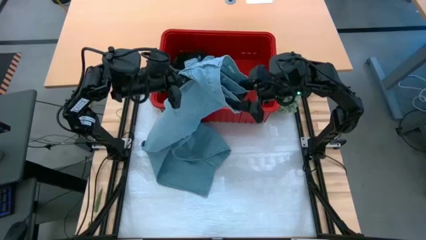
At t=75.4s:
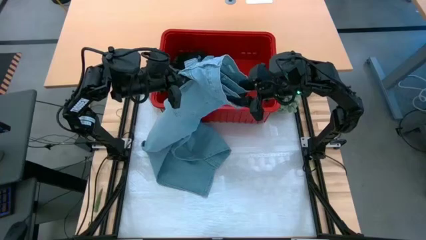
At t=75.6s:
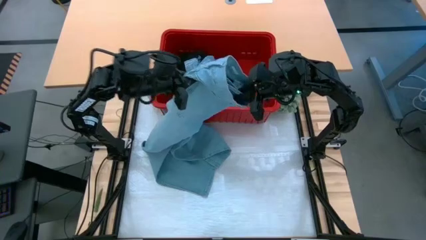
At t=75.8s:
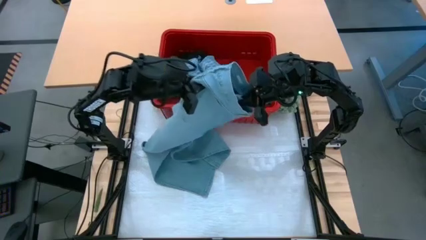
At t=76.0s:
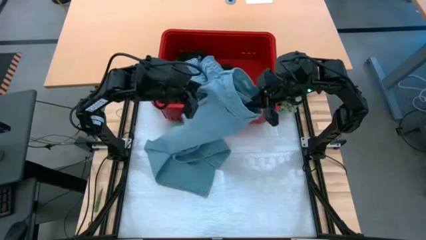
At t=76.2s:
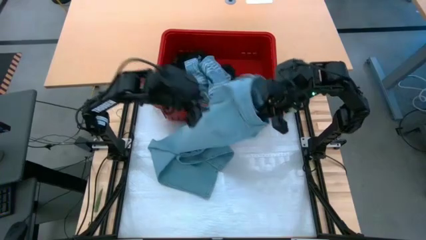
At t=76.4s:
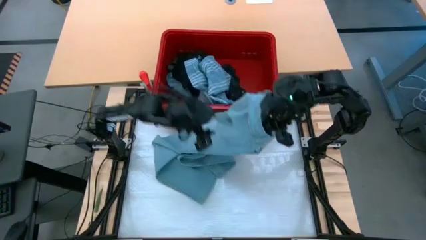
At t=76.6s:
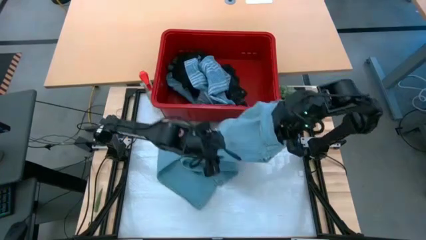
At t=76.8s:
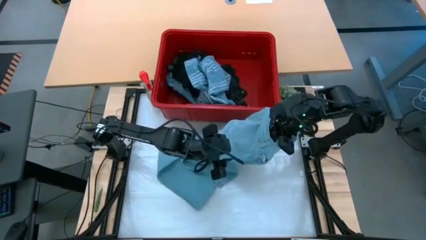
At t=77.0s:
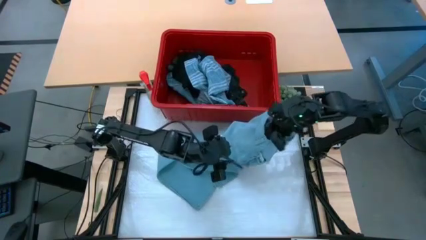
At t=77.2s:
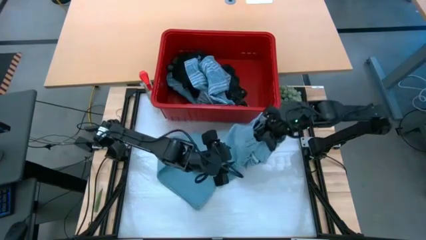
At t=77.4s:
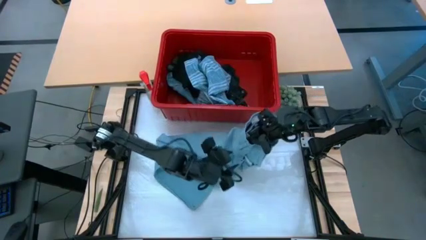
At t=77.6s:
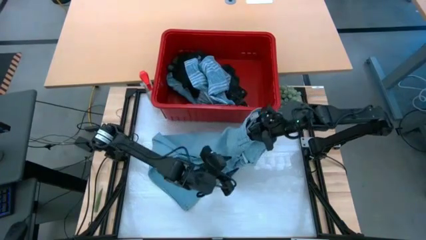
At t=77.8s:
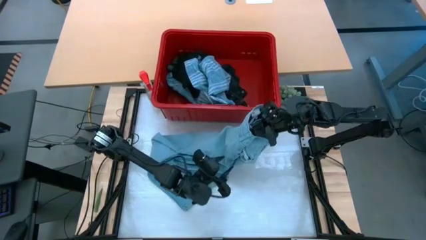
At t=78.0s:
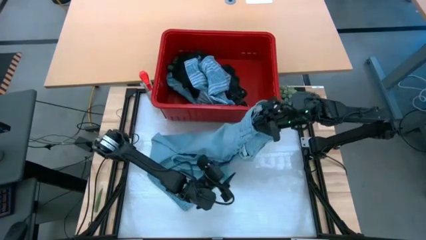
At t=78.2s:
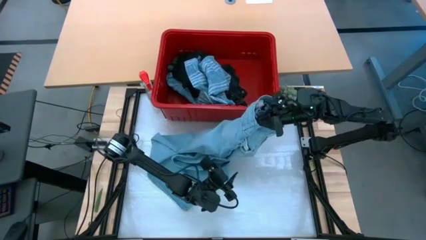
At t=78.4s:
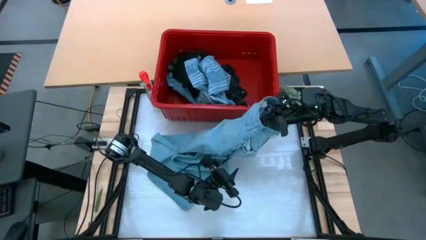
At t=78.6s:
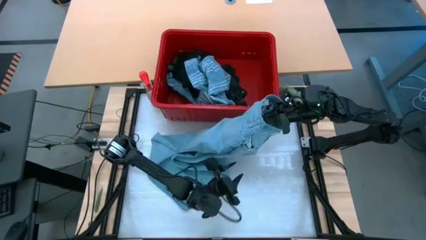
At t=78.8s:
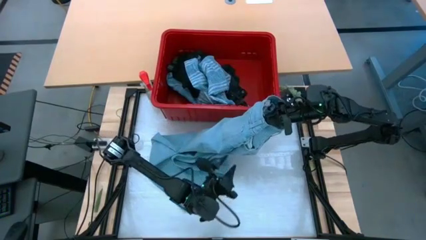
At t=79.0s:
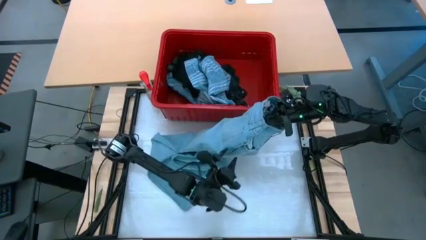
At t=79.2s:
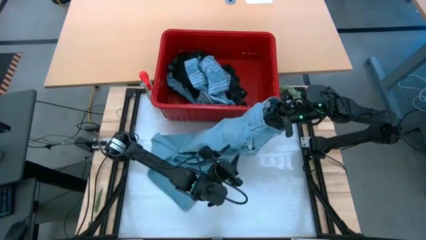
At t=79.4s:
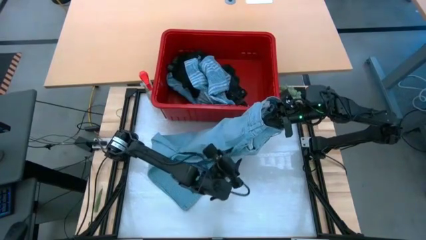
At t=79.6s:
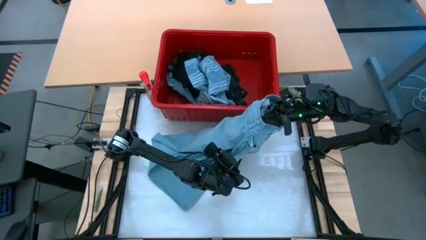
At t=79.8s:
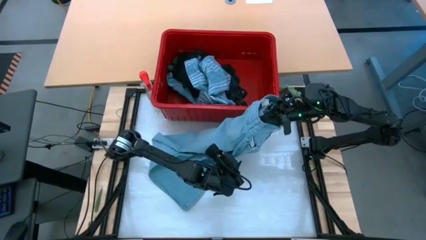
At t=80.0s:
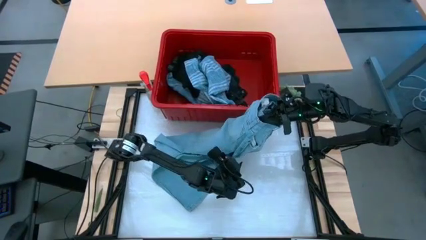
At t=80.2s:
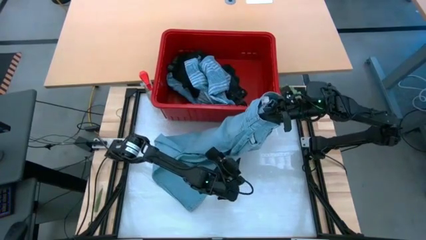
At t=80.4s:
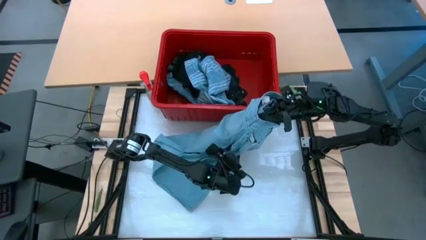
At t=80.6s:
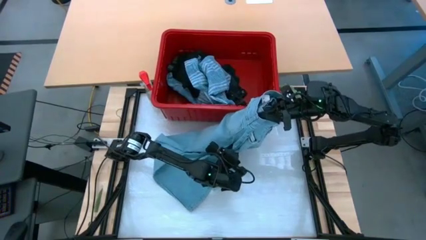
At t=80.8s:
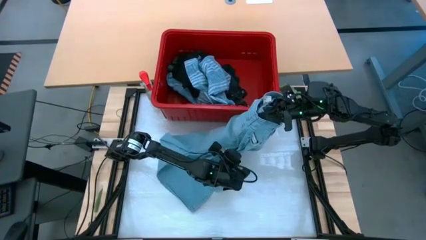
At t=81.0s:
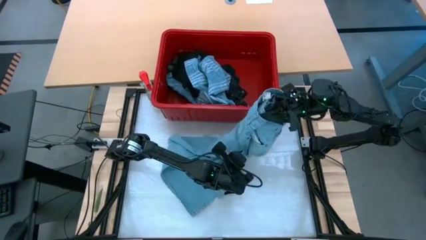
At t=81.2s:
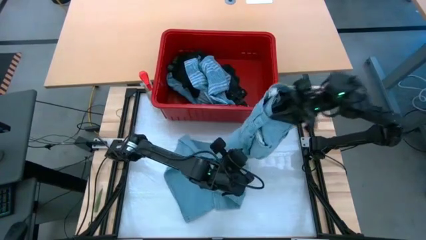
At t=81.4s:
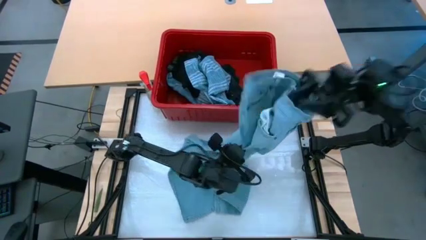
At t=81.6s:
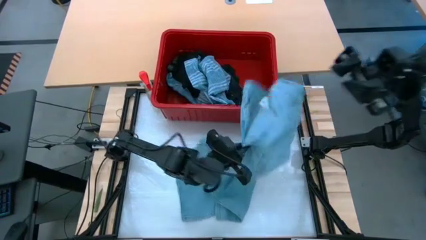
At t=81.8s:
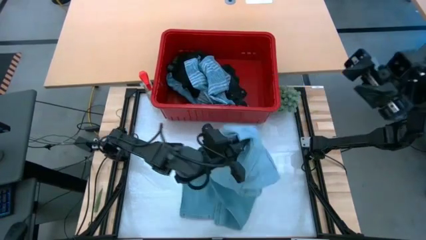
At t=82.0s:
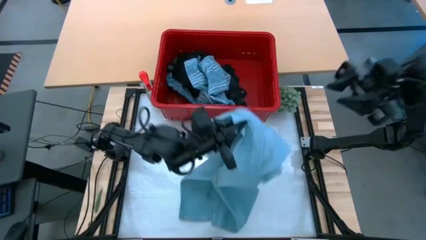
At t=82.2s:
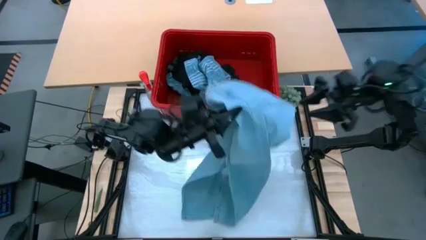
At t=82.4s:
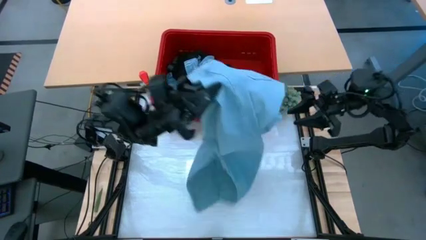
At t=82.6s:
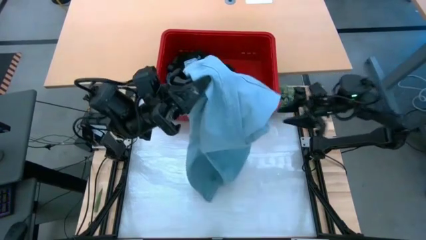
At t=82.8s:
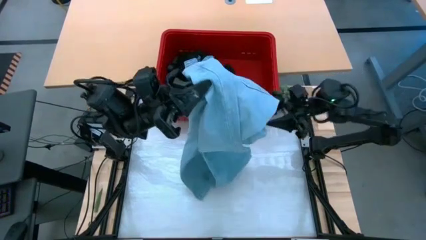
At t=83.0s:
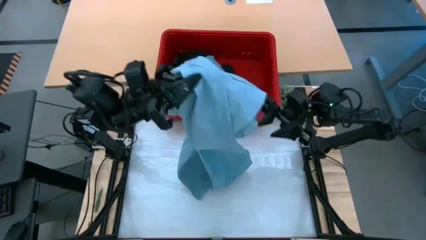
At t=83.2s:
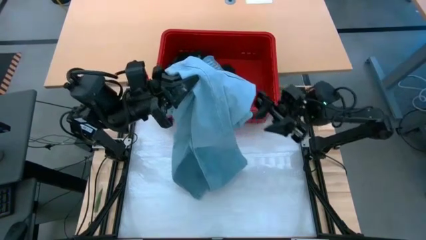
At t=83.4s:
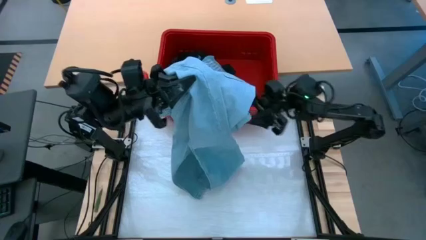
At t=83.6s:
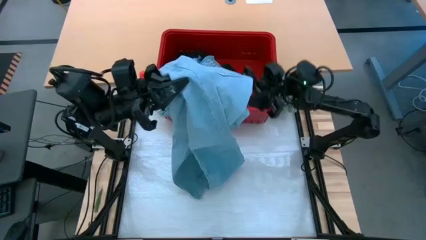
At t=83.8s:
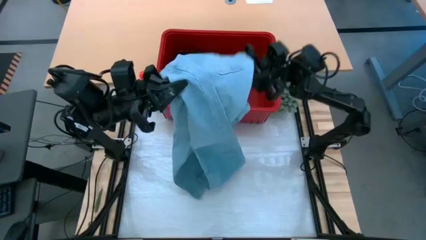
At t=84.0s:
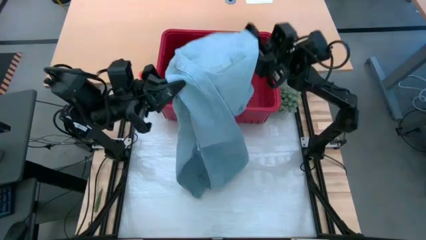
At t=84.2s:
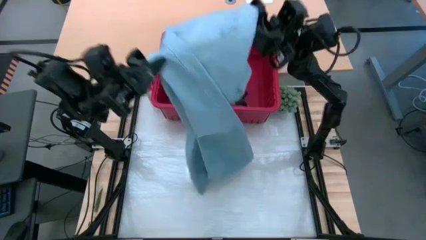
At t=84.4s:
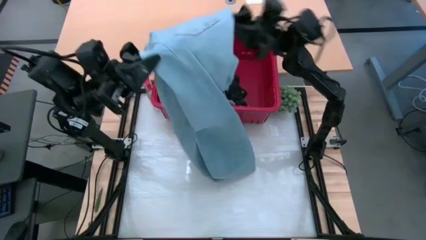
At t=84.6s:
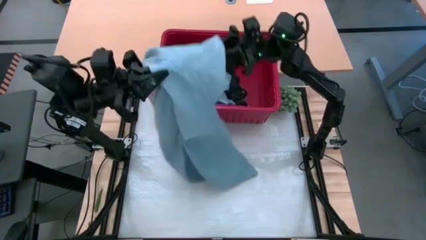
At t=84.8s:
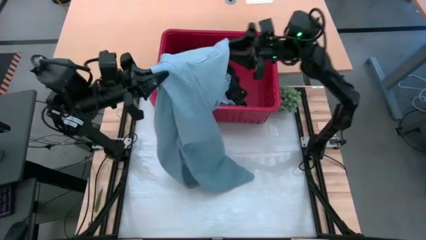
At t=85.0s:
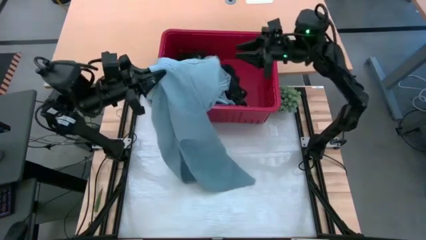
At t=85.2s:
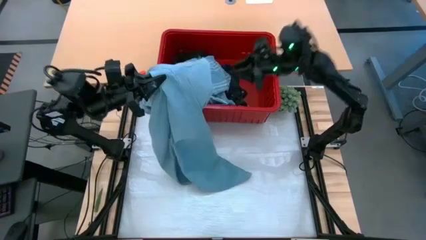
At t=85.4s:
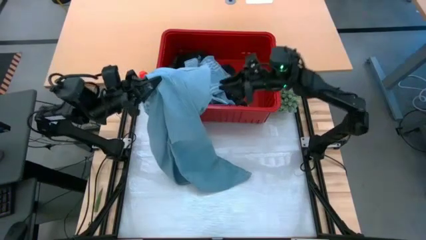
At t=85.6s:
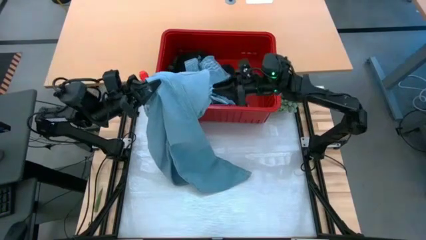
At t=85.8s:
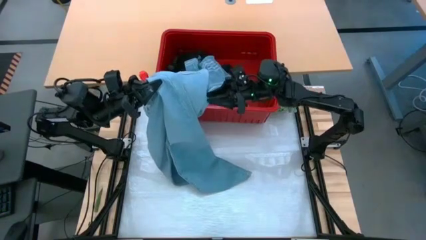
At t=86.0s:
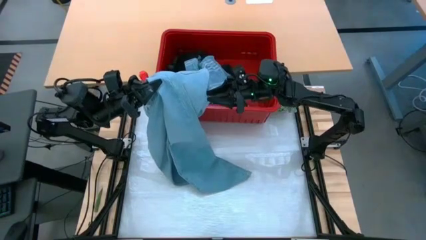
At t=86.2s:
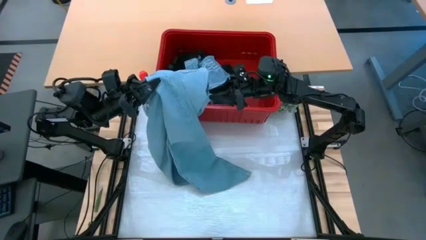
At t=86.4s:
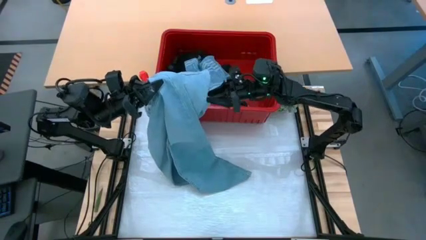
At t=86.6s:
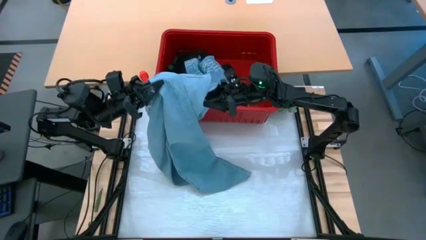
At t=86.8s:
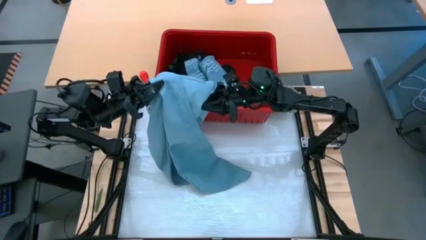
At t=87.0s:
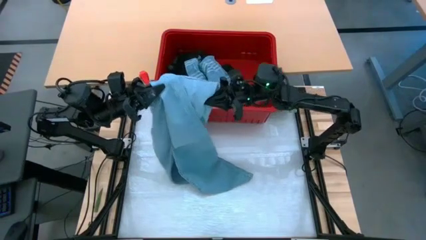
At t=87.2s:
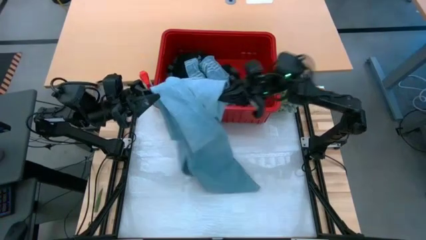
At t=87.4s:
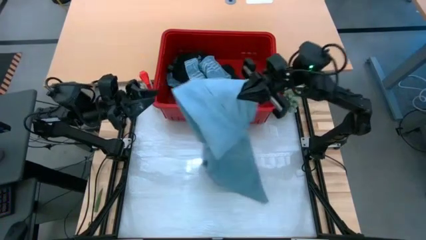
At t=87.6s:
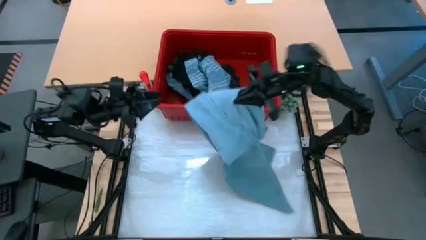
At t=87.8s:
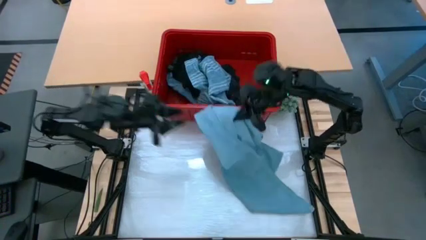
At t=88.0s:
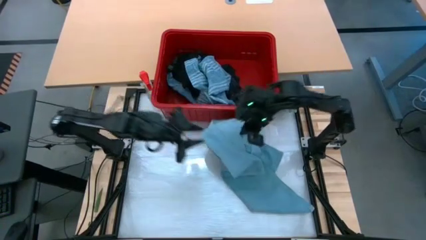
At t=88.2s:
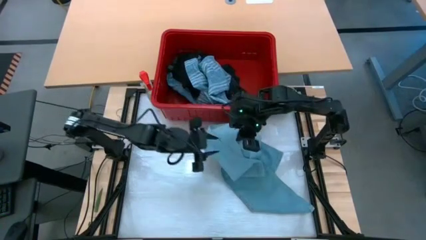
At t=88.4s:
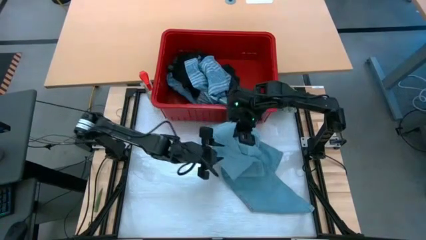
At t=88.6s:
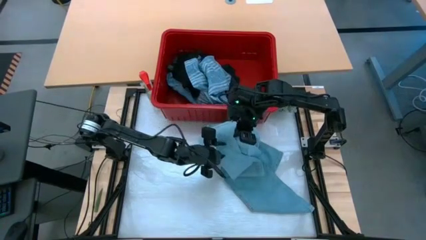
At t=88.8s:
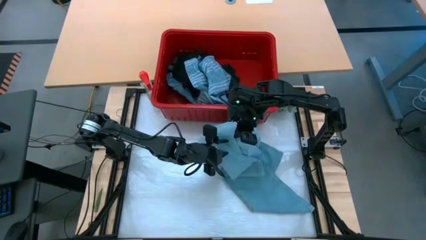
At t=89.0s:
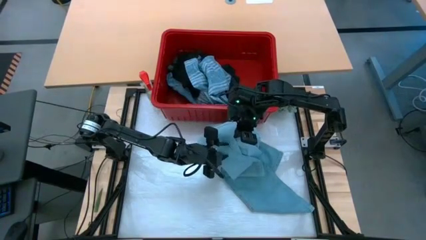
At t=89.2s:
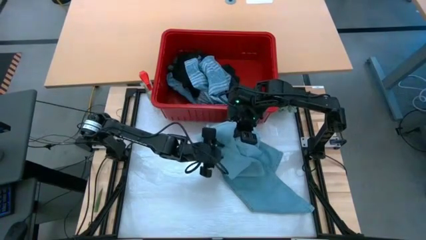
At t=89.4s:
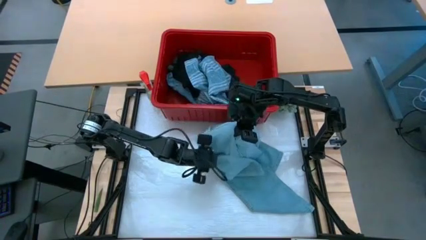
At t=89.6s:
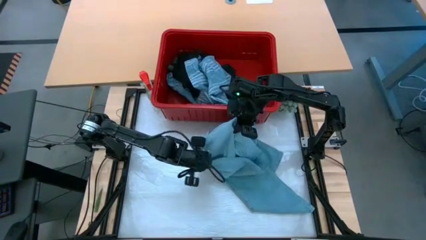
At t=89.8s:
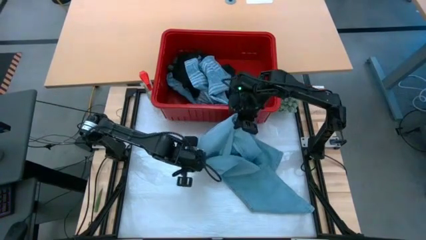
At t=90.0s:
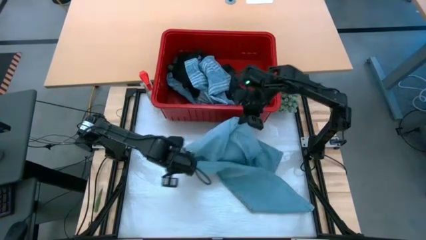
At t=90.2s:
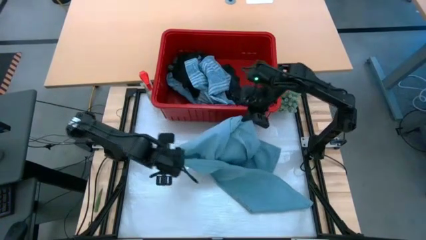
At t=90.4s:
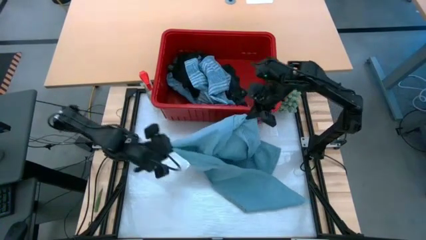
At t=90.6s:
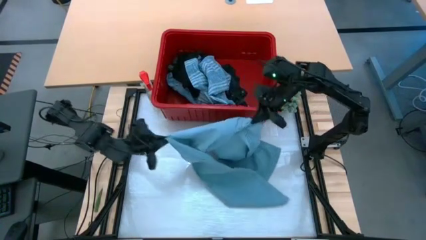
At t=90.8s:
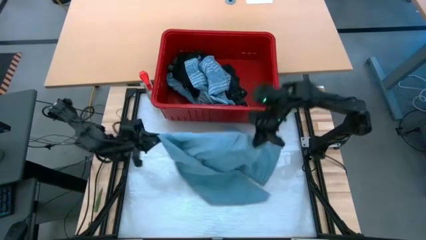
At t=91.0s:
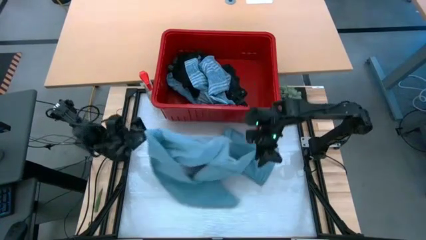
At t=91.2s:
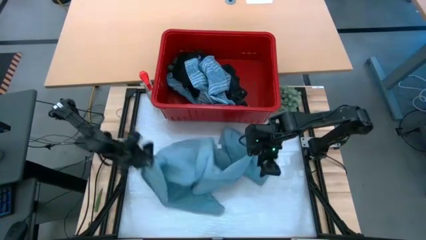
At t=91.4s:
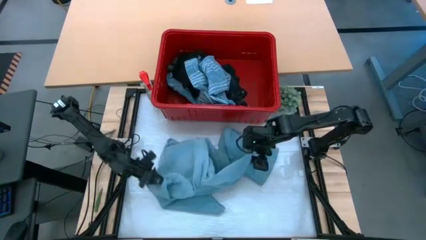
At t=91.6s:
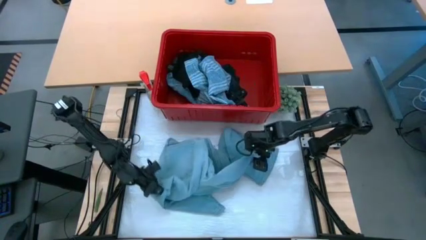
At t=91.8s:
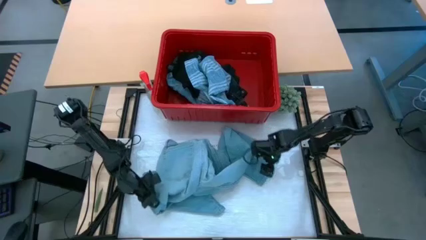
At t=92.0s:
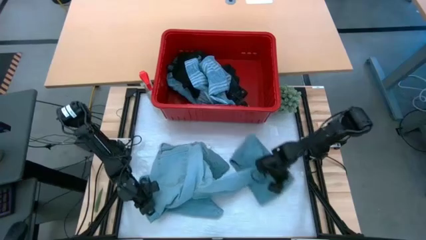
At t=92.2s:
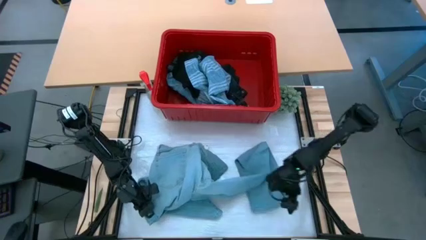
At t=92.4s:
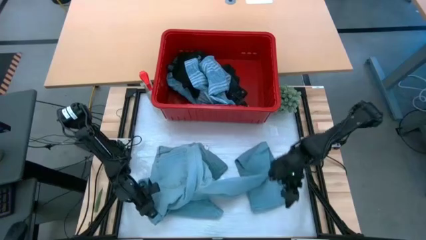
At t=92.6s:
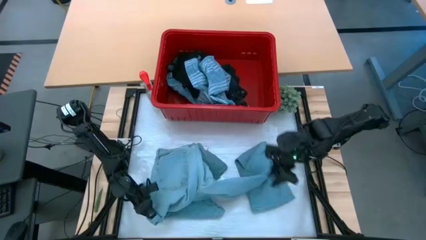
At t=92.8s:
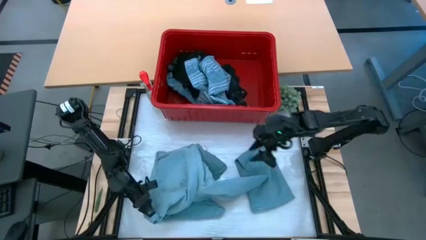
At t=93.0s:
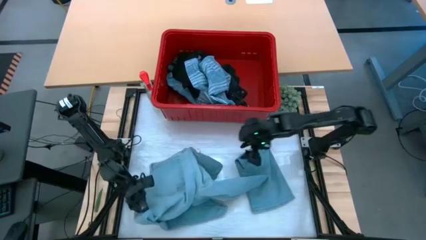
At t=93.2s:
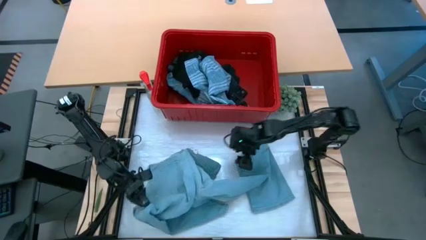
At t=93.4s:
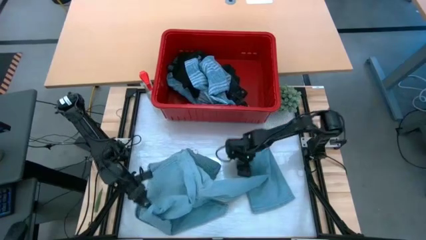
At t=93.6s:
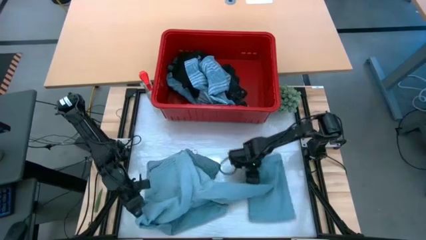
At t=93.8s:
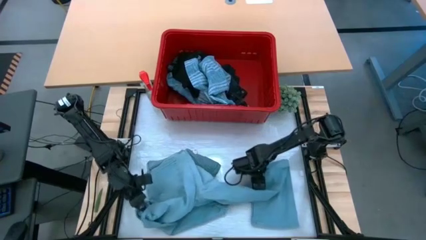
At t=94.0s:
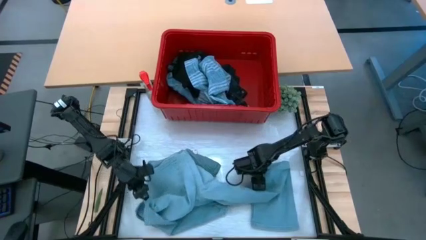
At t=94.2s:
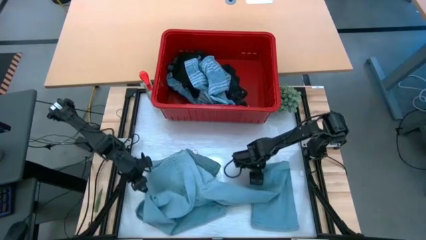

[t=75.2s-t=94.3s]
Task: Fold Laundry from Bin
Fold the light blue pants
